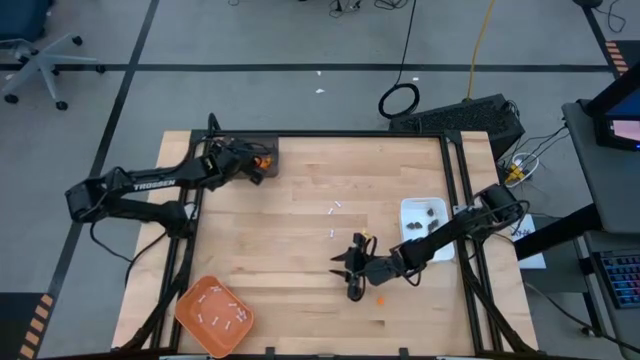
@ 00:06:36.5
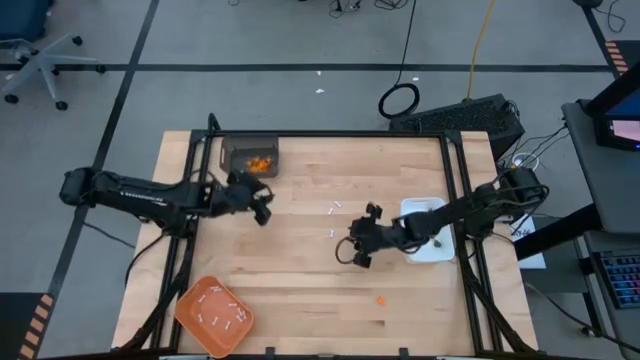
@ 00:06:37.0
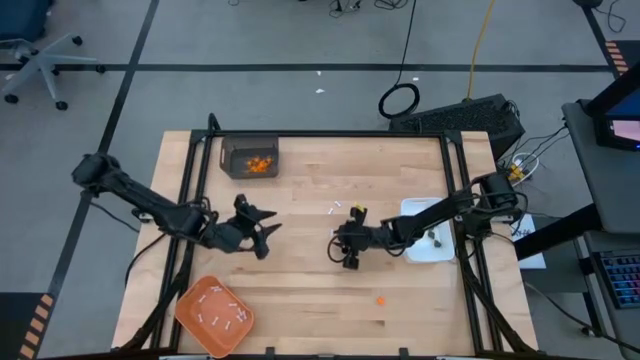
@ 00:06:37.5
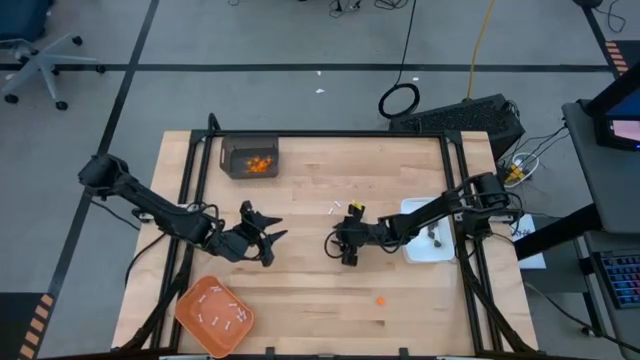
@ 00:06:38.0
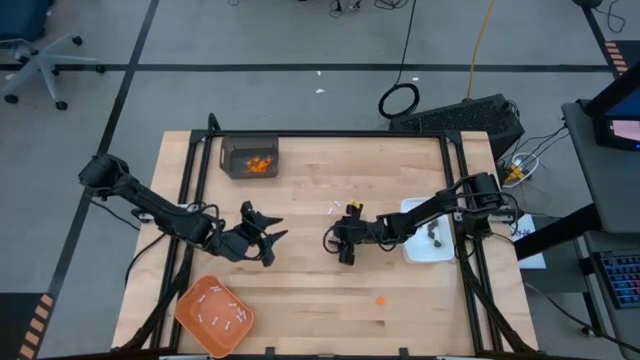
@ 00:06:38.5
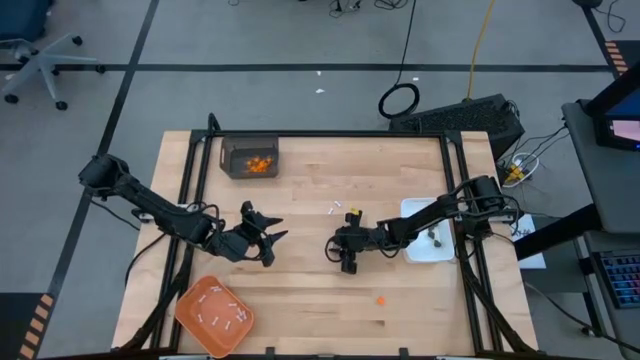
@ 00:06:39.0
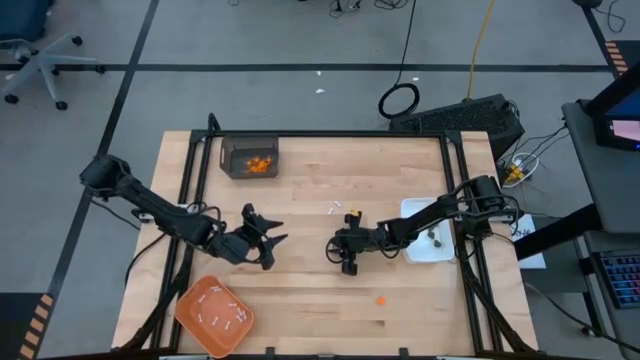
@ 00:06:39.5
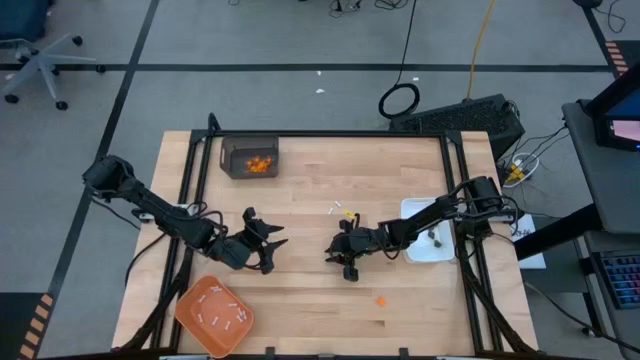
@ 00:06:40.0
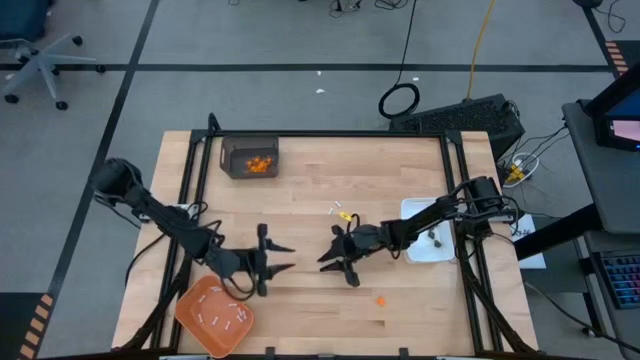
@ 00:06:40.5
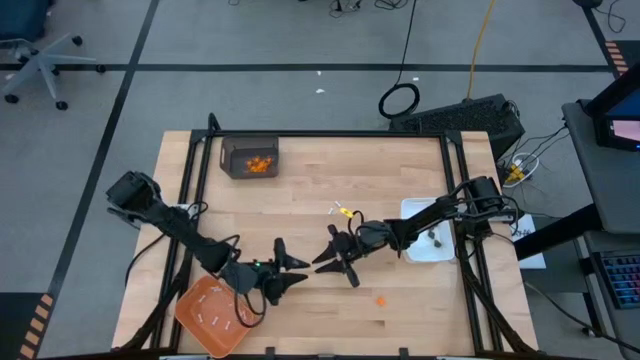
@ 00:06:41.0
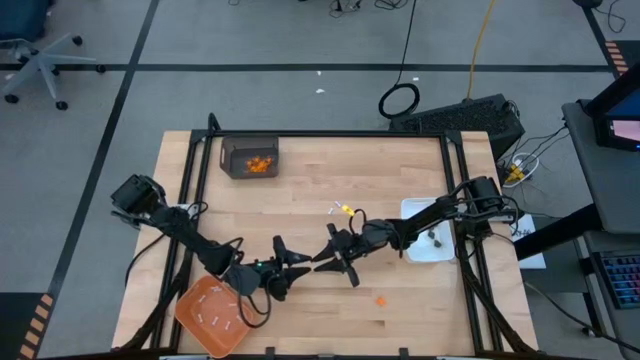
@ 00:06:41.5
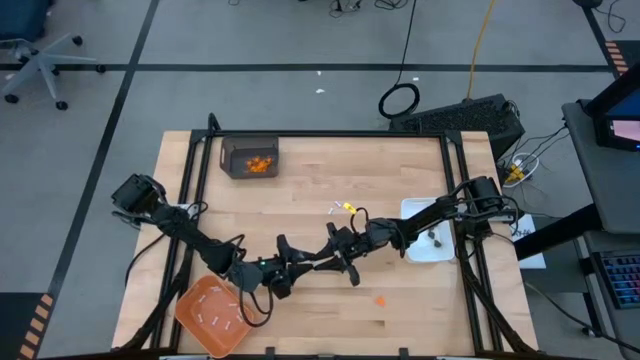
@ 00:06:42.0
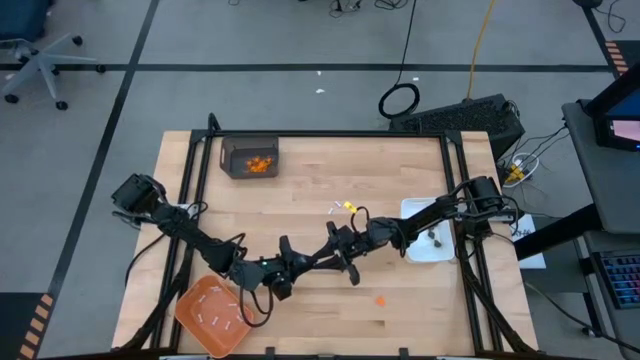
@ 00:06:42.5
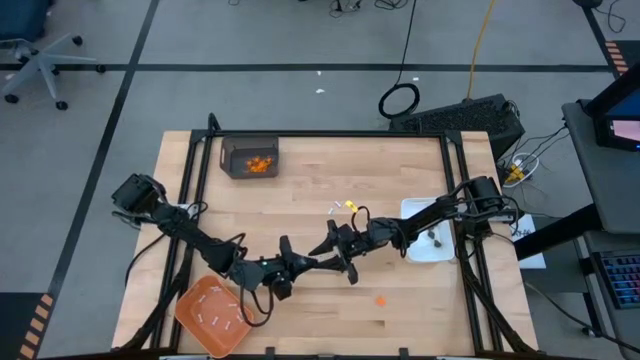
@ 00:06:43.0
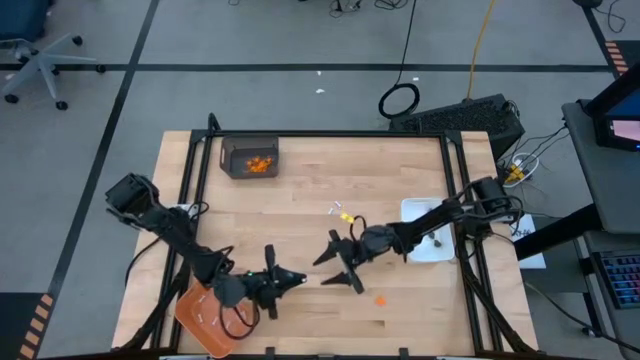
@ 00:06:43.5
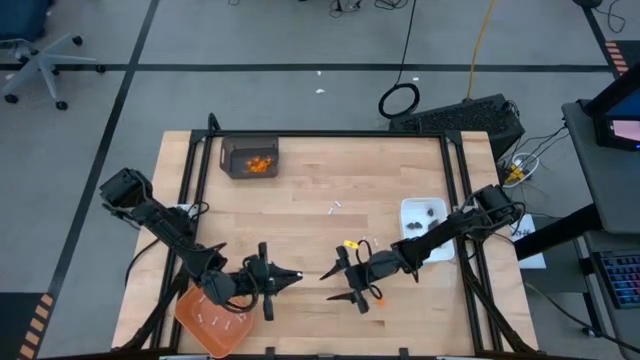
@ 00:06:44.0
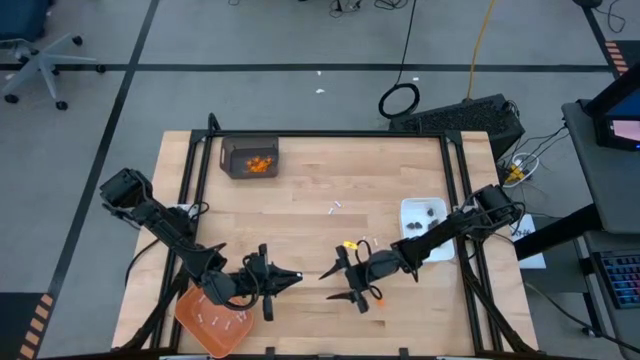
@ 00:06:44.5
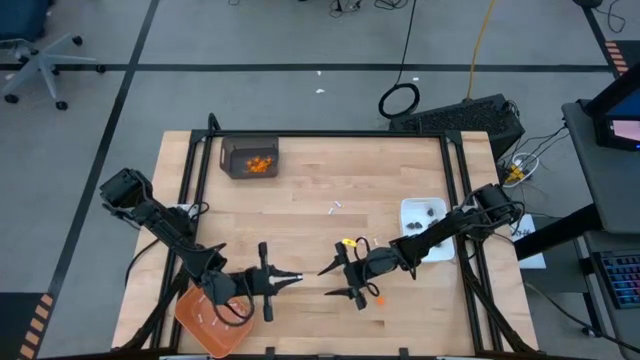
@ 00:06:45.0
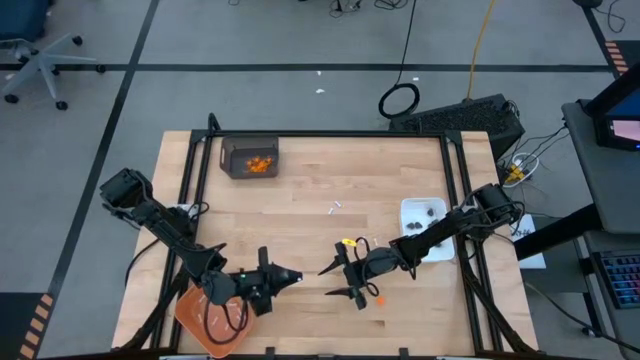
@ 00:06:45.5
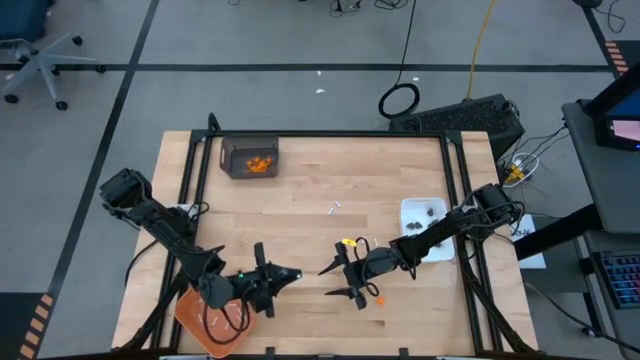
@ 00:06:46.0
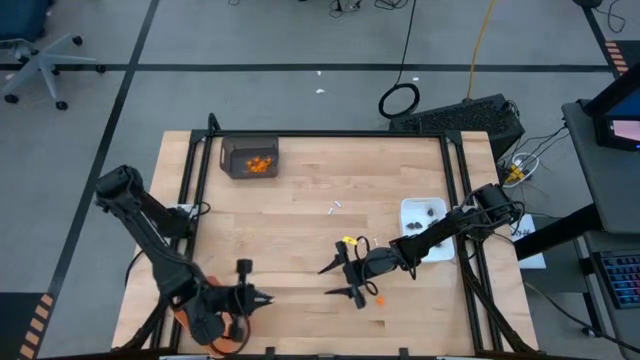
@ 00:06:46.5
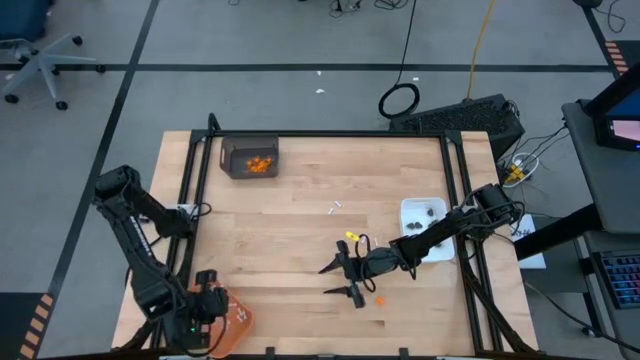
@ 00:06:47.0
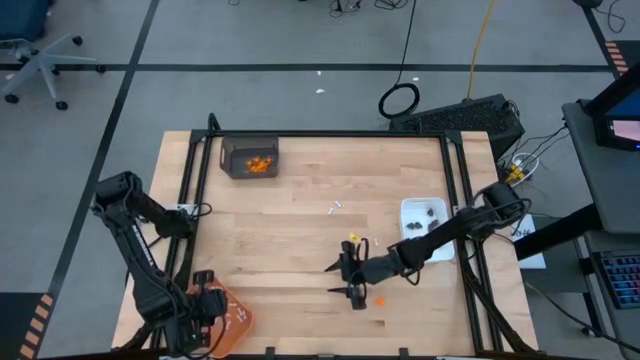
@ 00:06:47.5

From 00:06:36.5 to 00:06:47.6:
Task: Sort Halloween decoration
Put the white bone toy into the orange bin

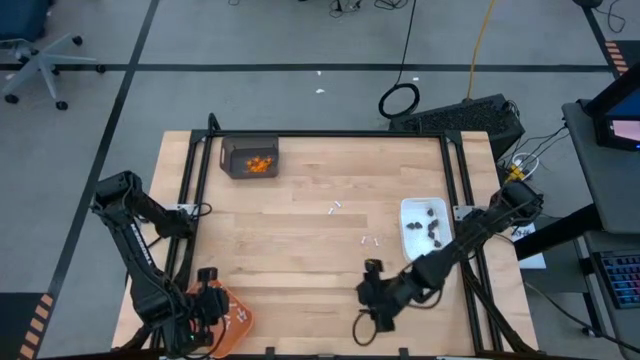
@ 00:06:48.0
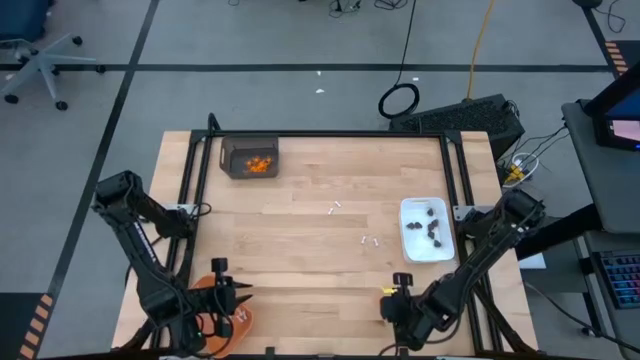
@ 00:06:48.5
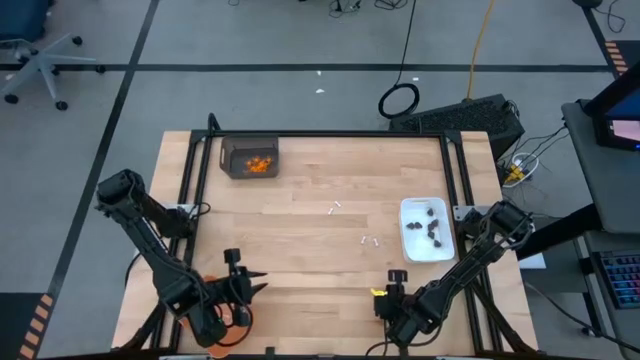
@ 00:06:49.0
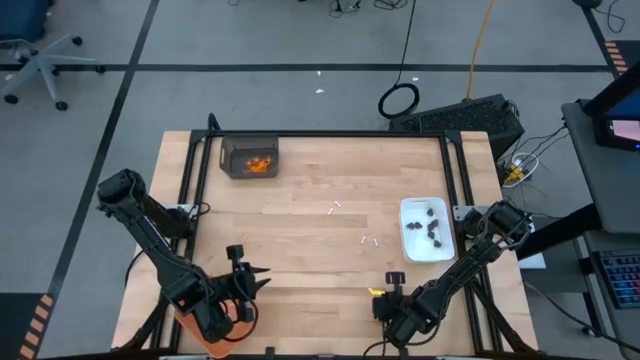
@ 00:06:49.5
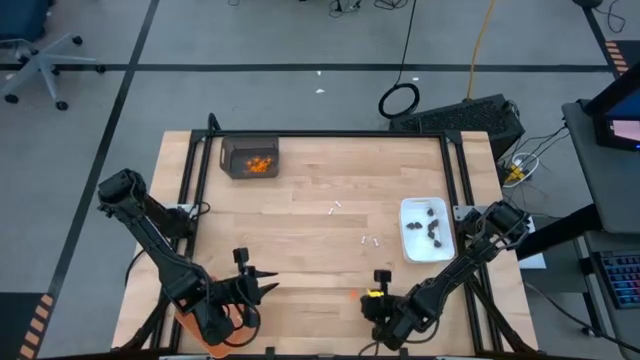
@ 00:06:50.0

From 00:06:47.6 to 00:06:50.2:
Put the orange spider toy into the black bin

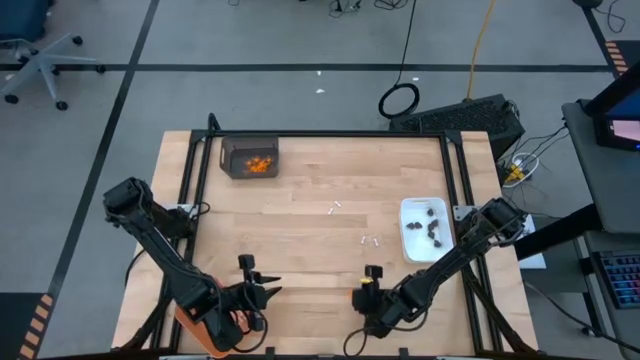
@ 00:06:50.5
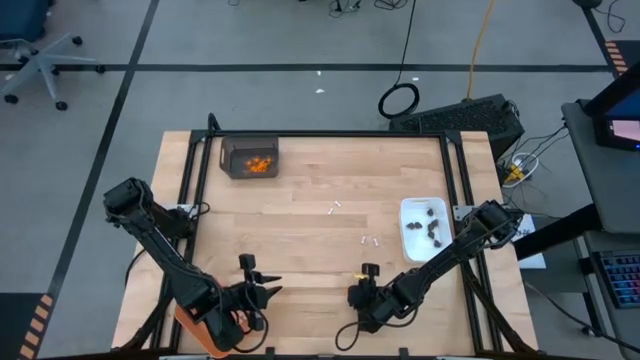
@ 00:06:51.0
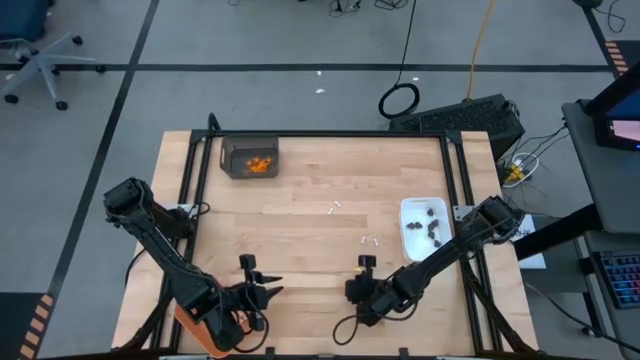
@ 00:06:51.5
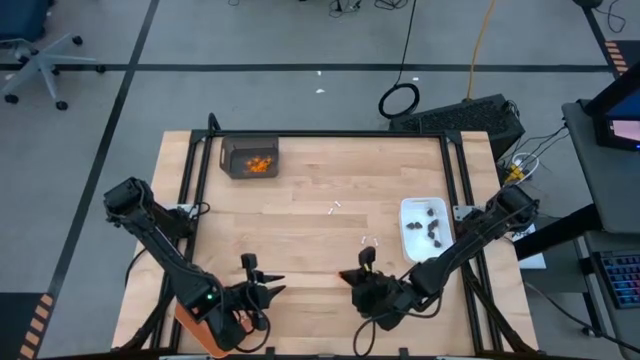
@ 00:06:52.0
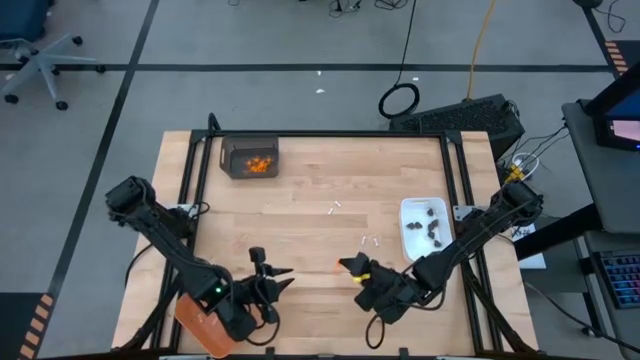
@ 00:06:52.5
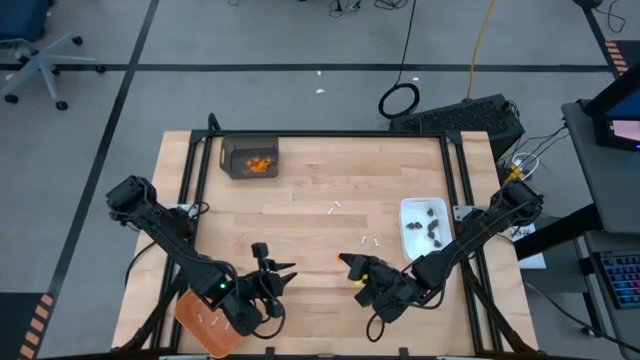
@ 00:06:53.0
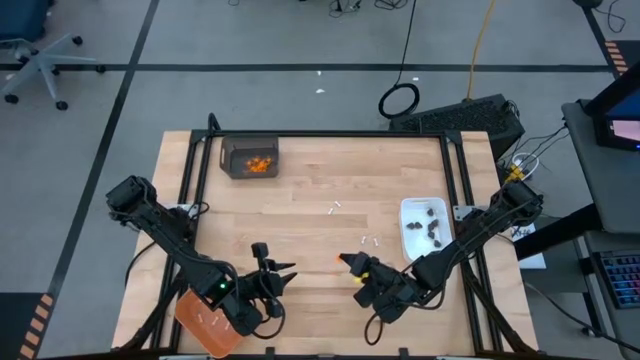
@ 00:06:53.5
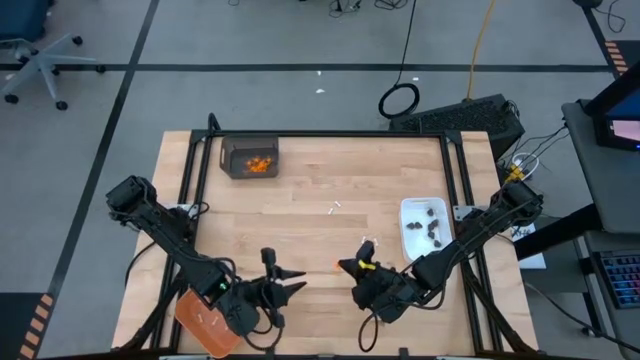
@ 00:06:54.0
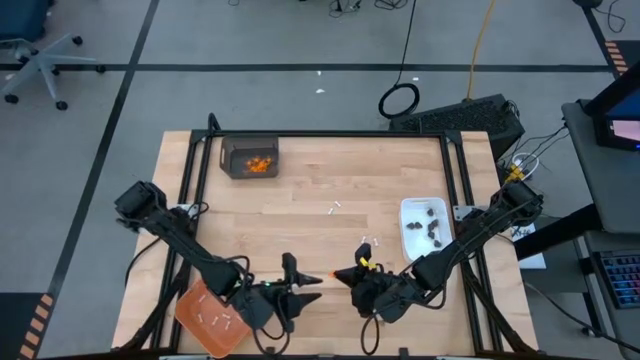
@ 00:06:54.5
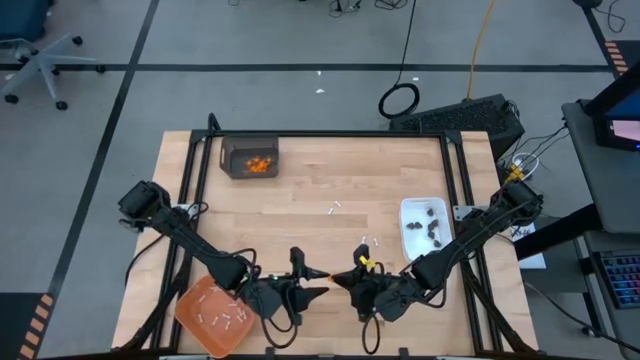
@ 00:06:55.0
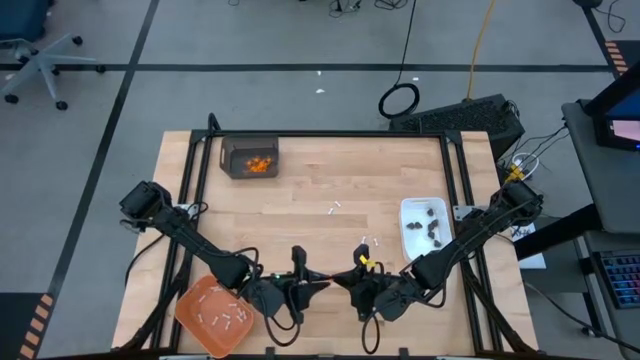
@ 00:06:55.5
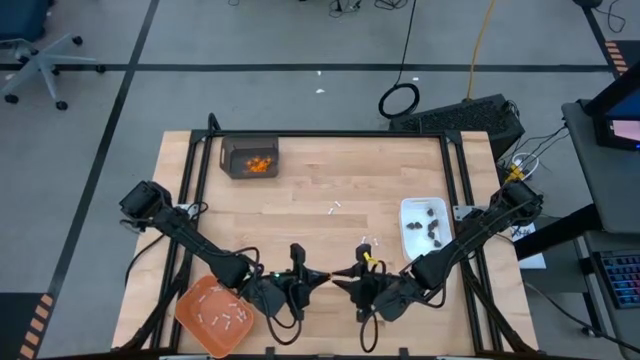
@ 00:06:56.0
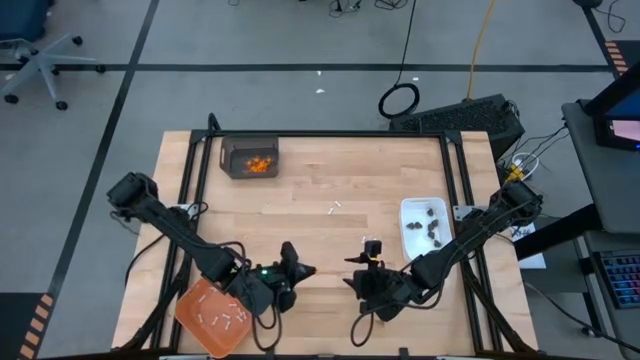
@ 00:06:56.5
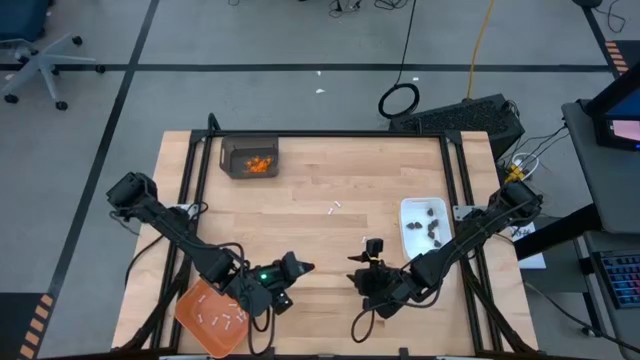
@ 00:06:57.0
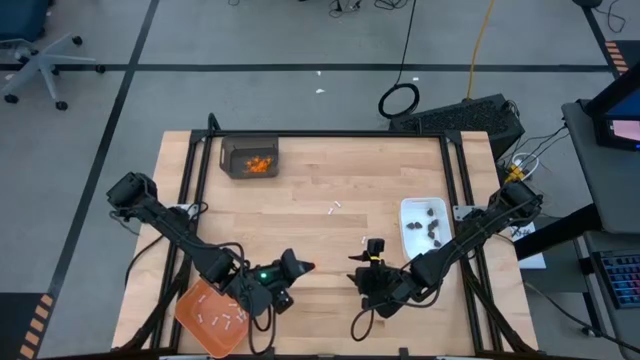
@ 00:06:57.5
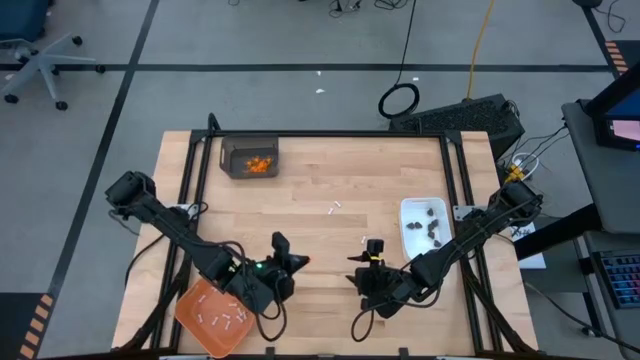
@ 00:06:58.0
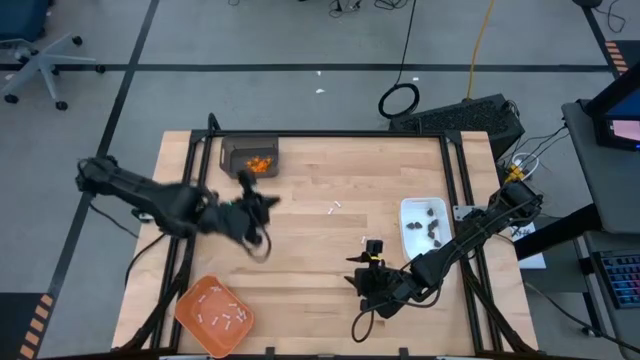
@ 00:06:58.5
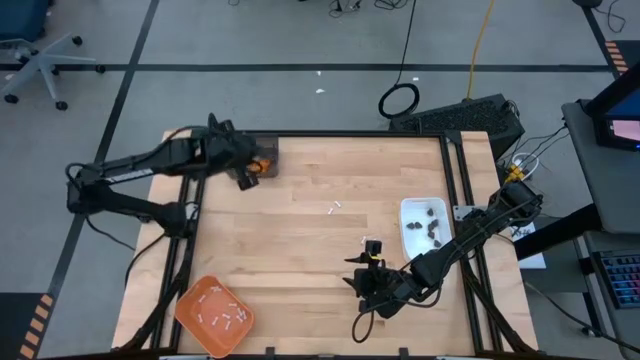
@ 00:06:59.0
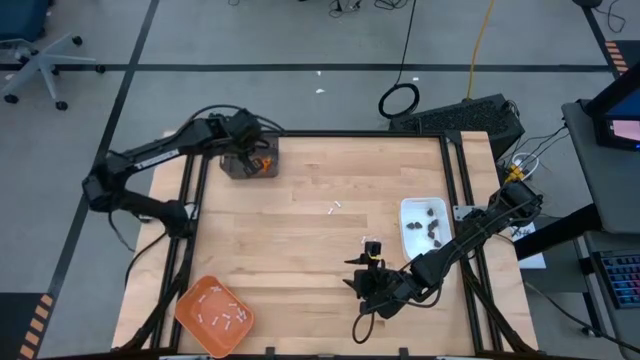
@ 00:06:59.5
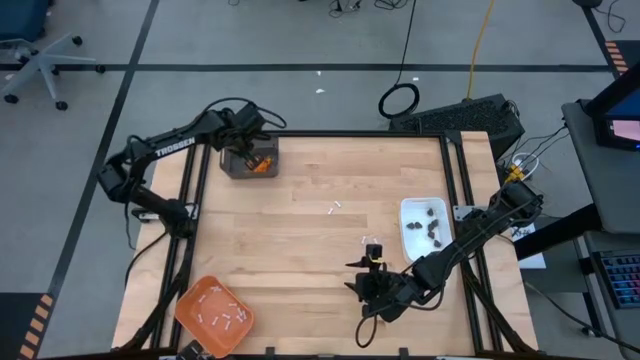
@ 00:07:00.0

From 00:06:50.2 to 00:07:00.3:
Put the orange spider toy into the black bin
